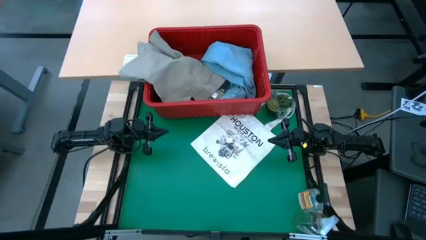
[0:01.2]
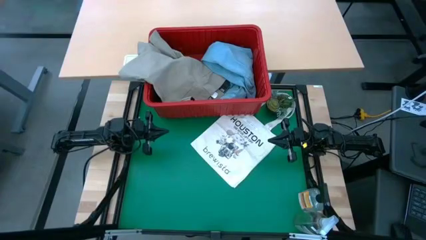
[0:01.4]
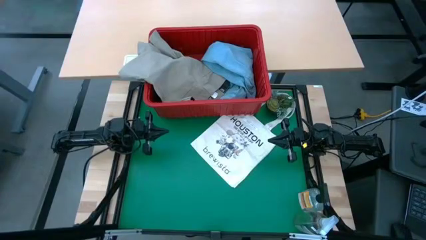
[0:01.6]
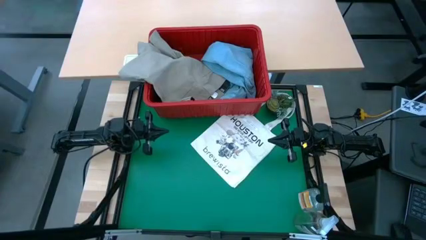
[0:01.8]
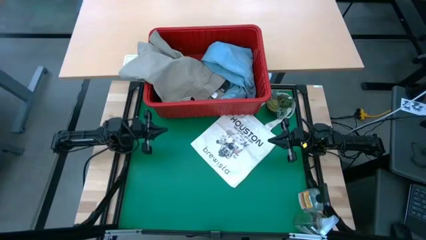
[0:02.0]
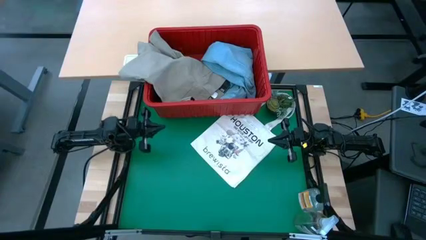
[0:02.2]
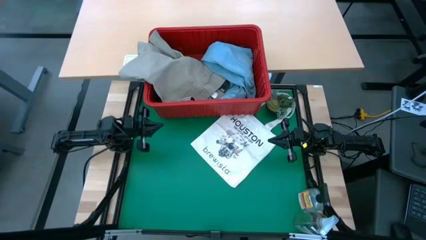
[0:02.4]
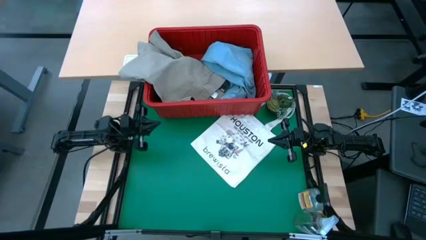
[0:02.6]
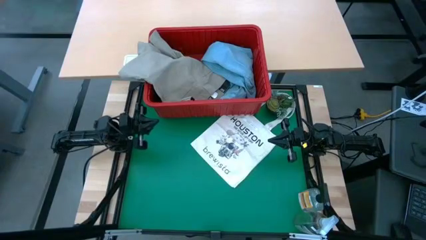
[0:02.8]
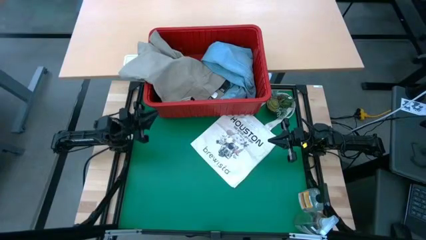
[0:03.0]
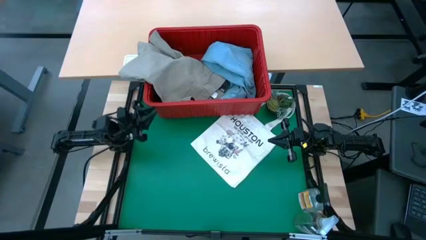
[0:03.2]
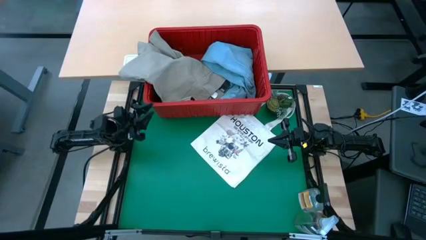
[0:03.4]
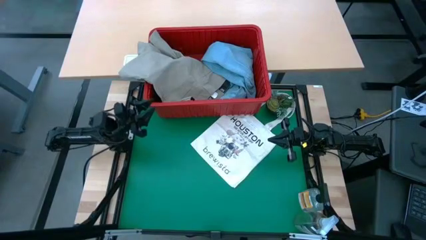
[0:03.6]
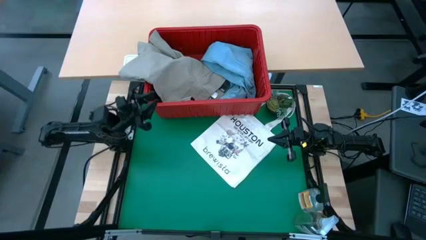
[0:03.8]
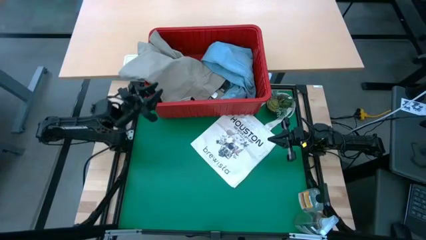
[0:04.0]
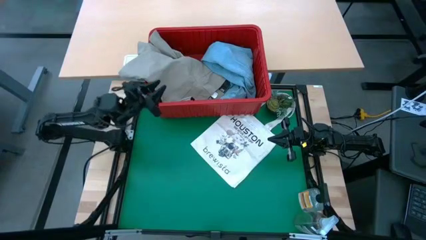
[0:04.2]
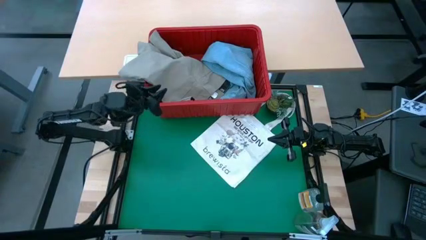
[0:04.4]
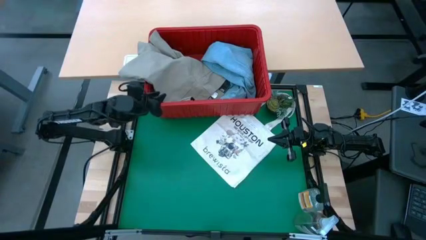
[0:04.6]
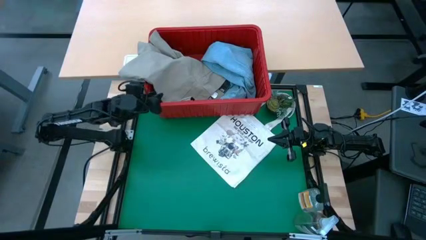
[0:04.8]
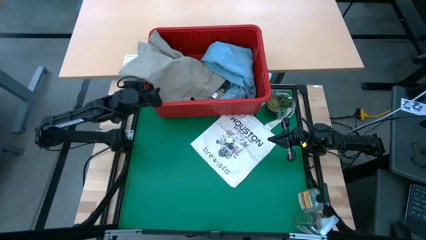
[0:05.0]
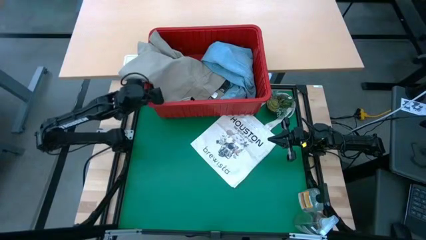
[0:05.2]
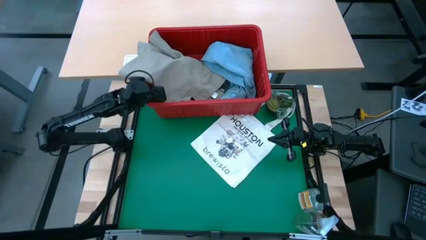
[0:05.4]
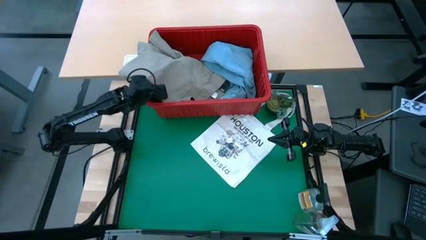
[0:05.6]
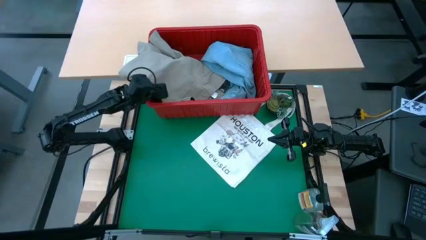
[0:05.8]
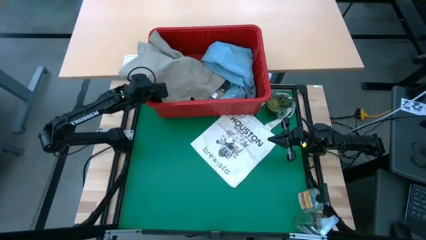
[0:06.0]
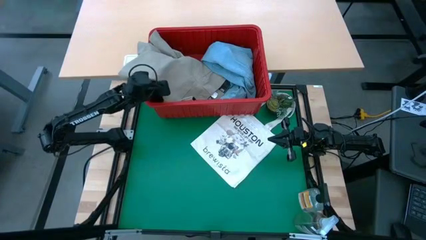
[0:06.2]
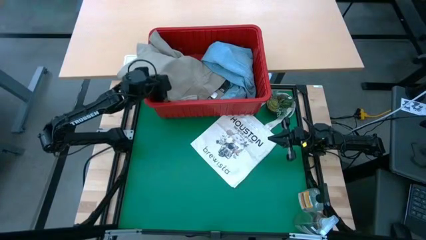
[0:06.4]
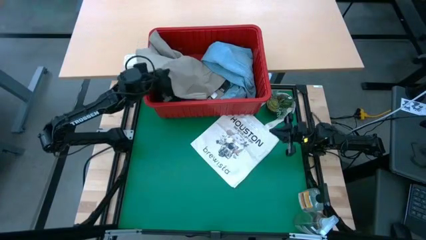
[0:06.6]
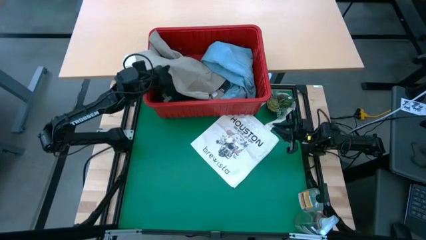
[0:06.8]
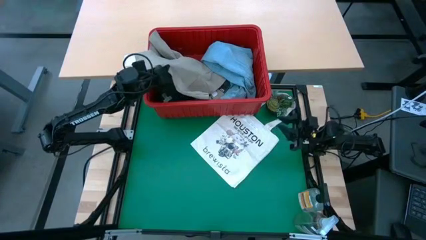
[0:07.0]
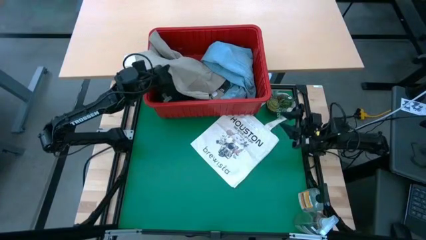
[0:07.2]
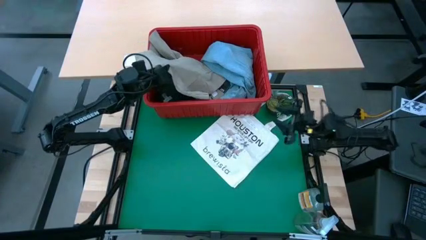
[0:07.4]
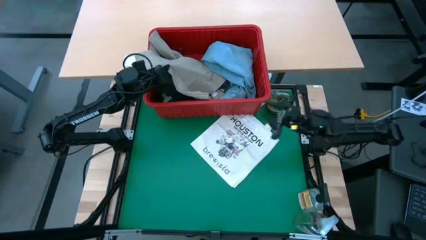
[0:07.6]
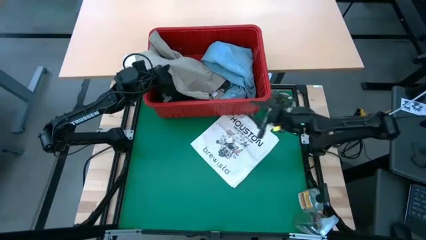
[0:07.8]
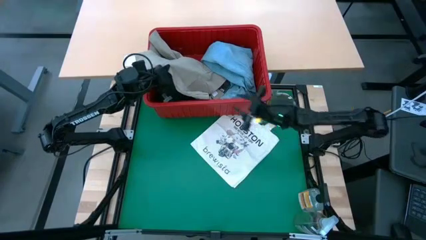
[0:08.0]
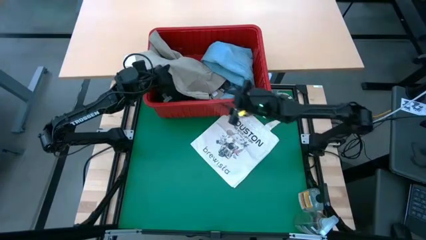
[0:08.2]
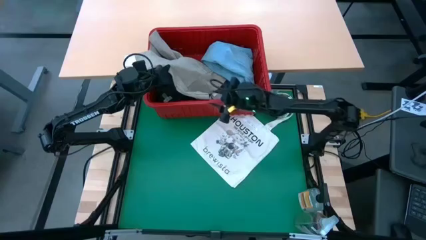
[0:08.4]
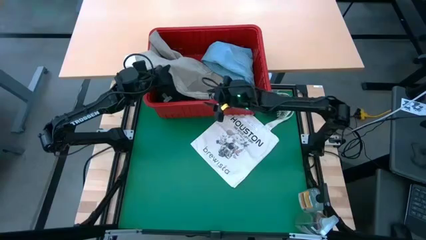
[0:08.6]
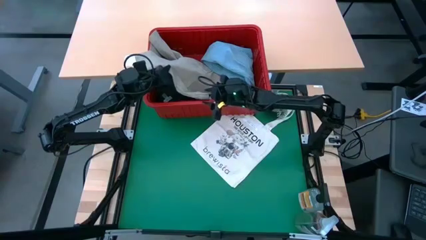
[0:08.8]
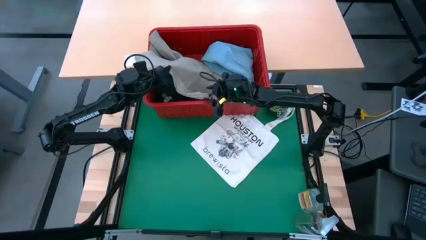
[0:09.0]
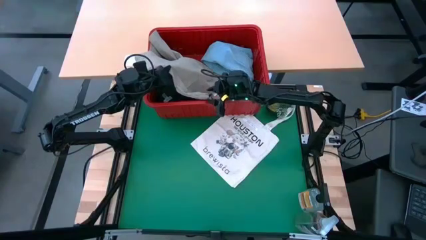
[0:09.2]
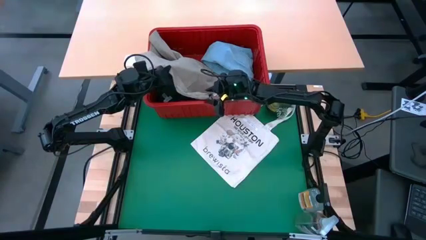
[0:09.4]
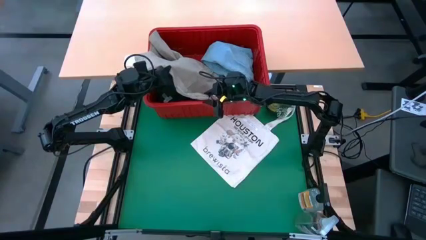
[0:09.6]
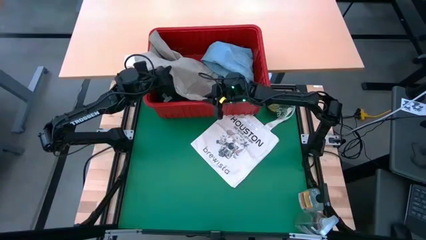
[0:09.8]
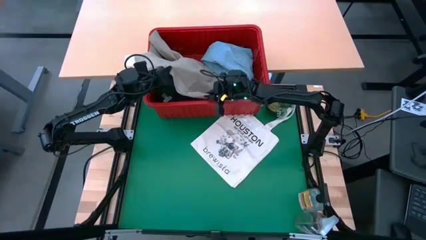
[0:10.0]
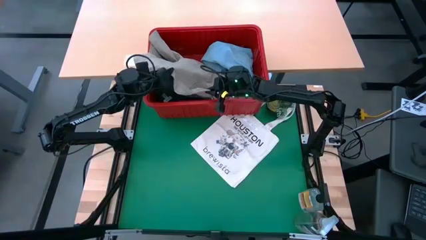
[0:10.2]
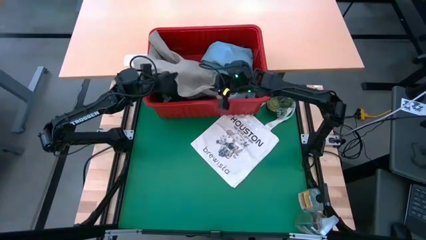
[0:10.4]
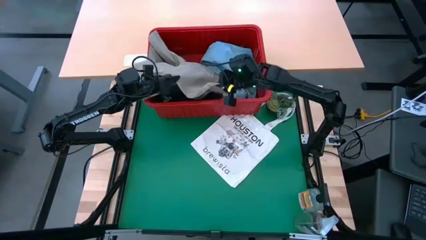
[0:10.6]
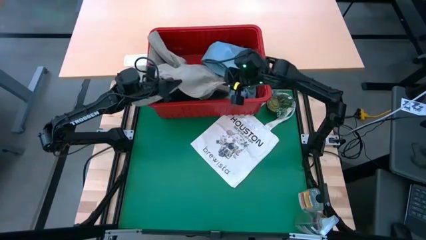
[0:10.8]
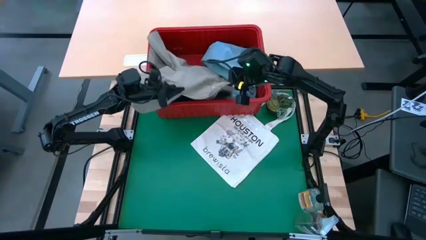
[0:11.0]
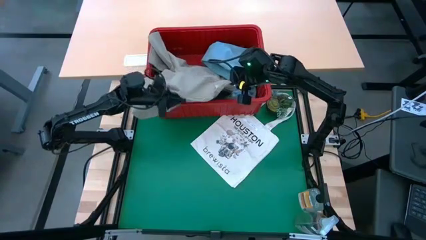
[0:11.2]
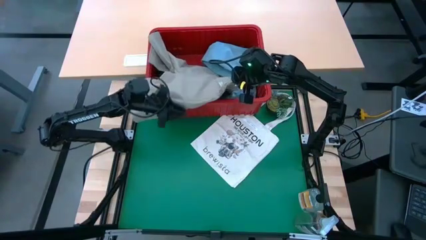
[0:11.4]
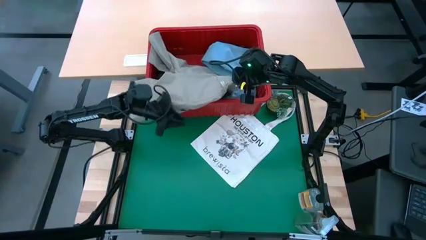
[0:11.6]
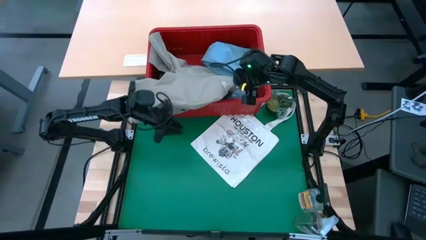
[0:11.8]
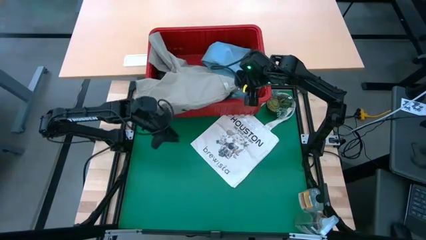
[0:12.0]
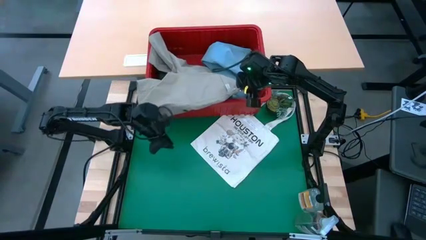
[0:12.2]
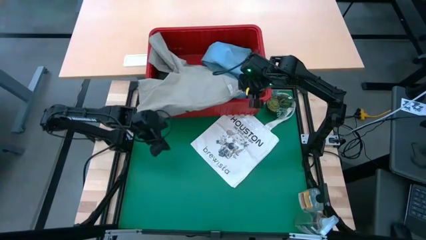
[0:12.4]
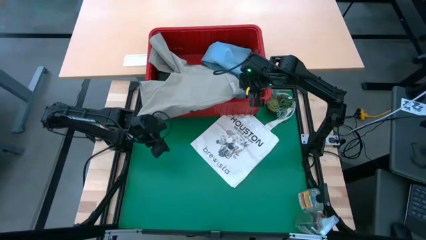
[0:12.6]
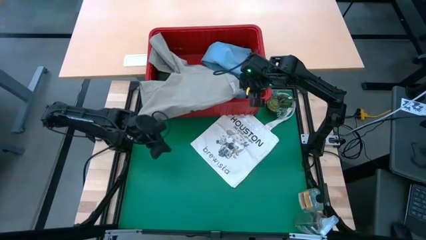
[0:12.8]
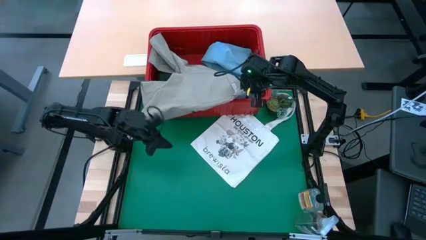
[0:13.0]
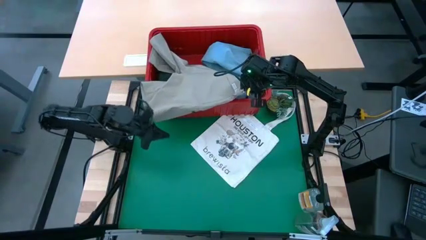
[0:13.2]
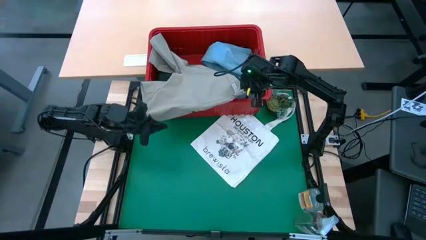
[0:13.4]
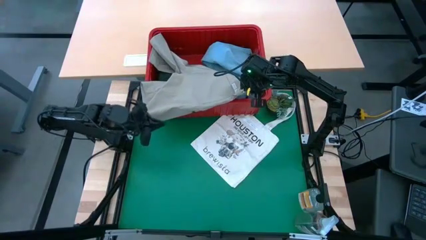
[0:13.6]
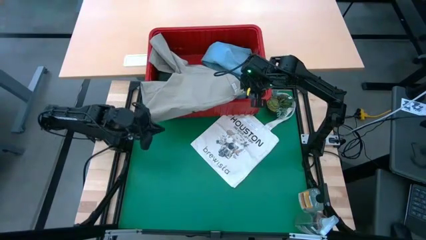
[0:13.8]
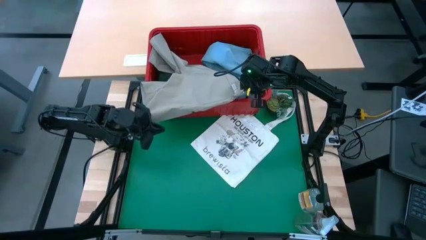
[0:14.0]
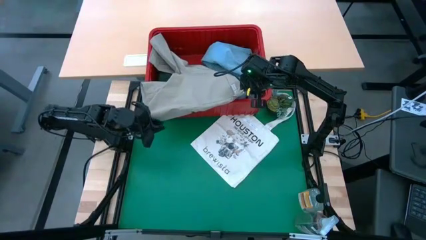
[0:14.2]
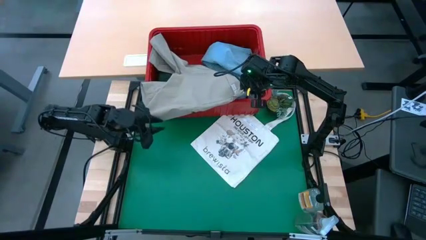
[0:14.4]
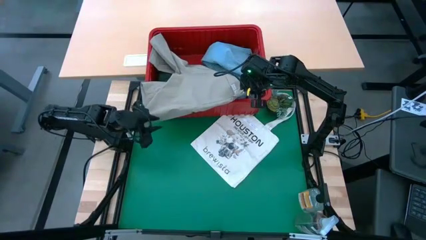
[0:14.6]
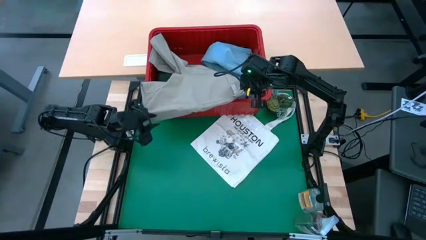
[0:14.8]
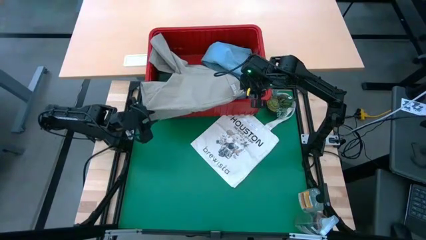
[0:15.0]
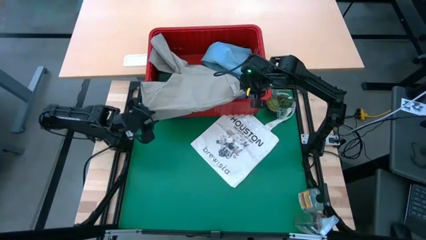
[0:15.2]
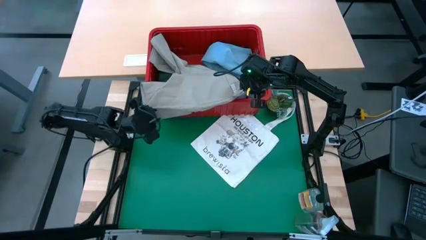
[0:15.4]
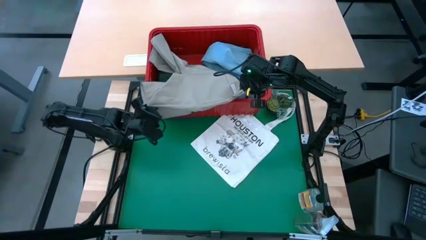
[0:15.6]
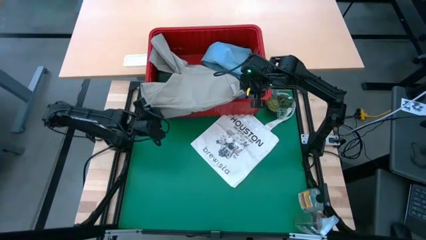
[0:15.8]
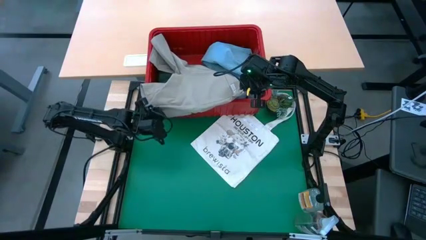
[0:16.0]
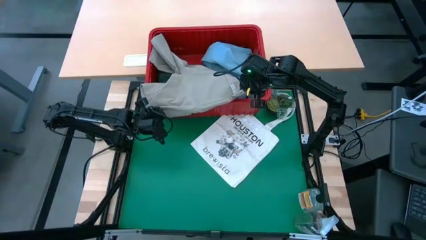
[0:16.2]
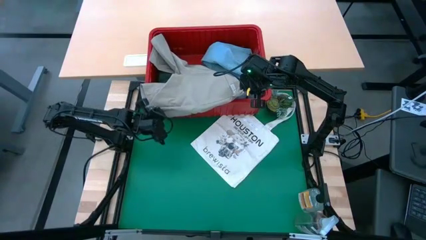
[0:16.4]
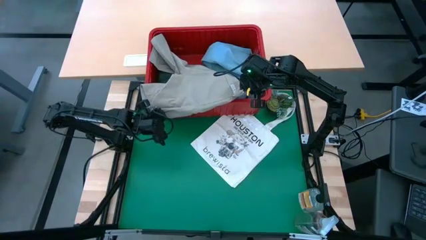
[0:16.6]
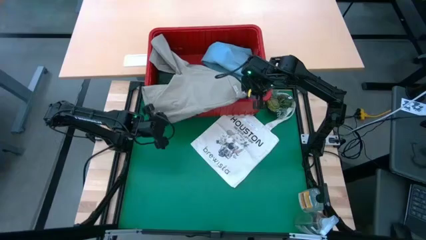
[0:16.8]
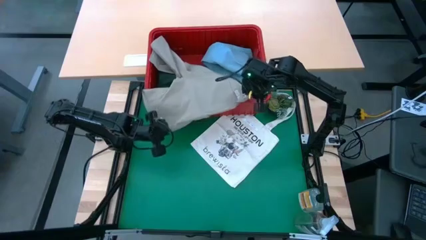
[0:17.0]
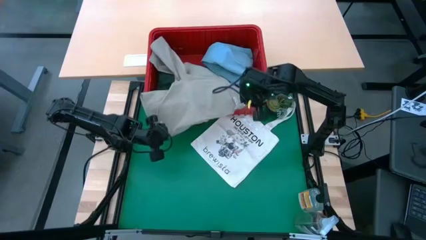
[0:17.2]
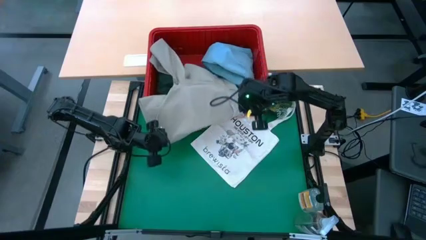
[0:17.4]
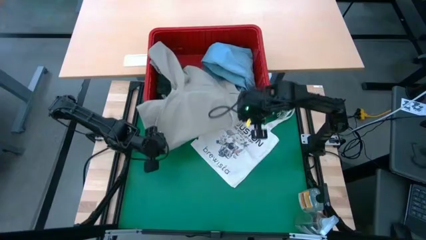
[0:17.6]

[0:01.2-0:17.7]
Task: Fold Laundry from Bin
Fold the brown shorts
